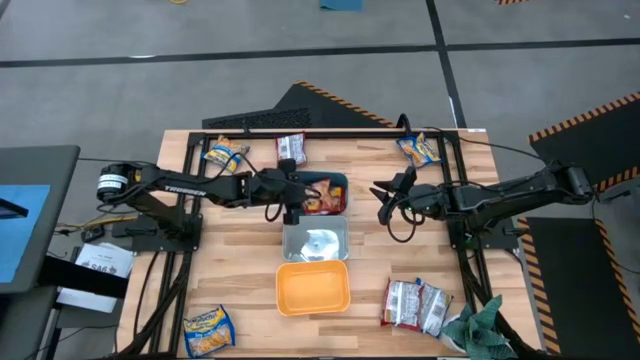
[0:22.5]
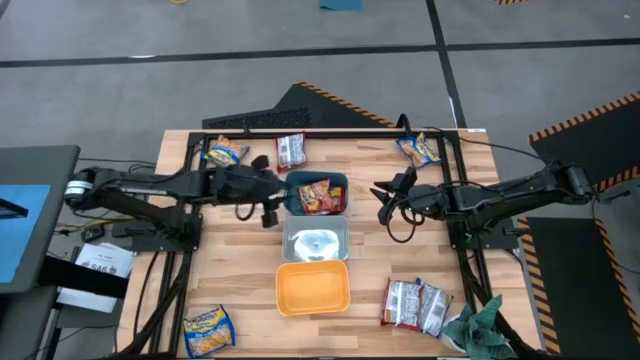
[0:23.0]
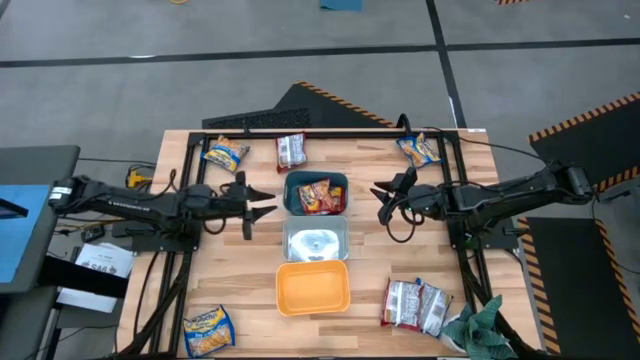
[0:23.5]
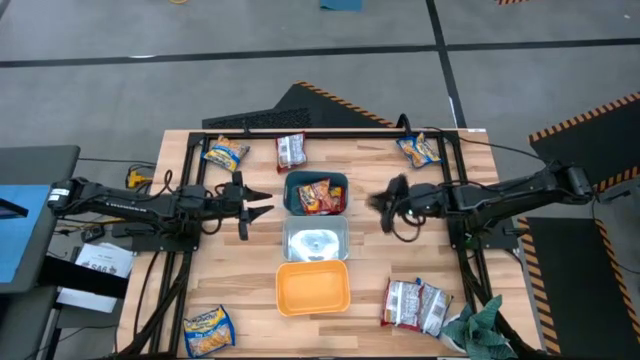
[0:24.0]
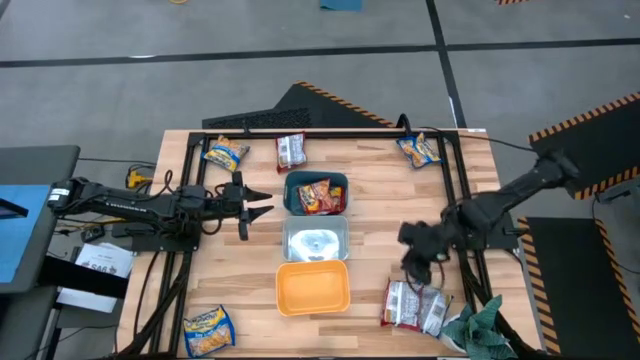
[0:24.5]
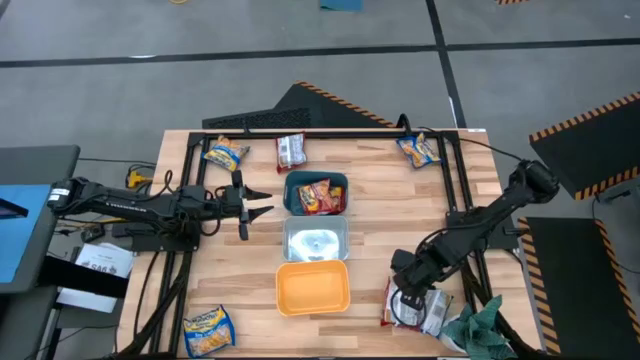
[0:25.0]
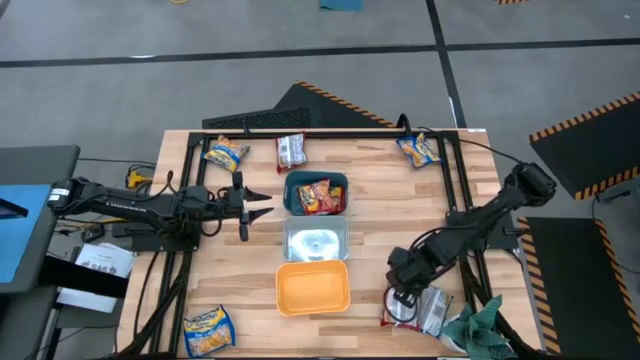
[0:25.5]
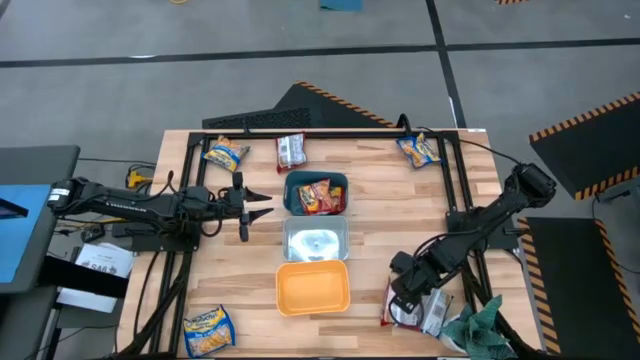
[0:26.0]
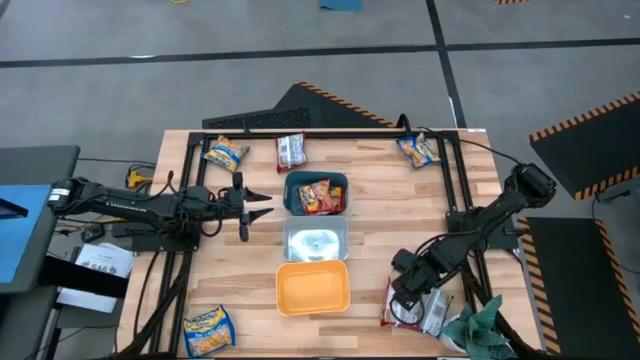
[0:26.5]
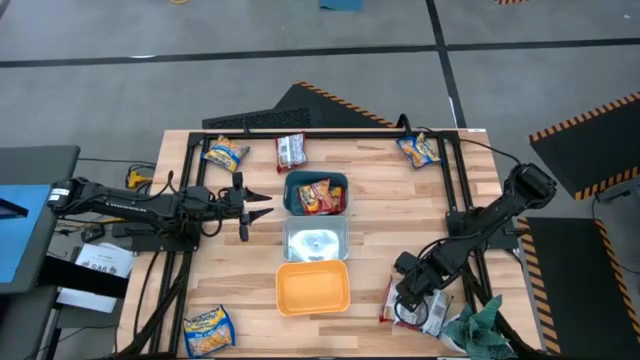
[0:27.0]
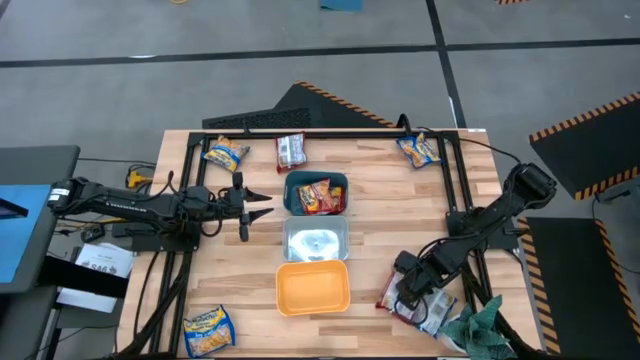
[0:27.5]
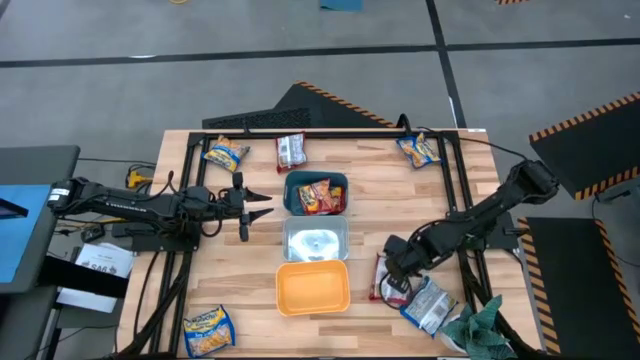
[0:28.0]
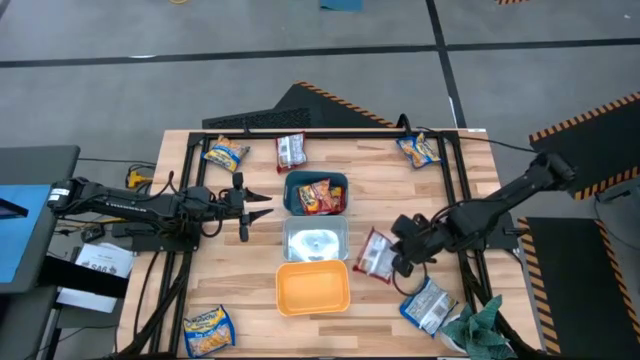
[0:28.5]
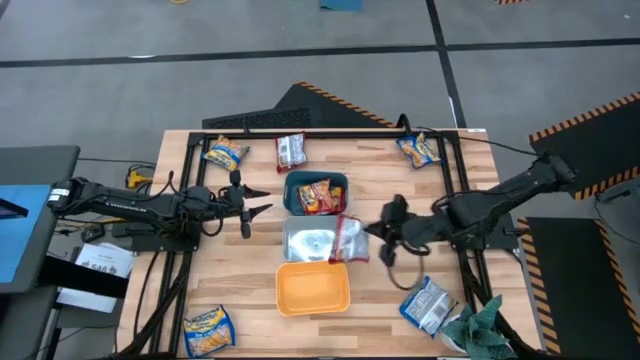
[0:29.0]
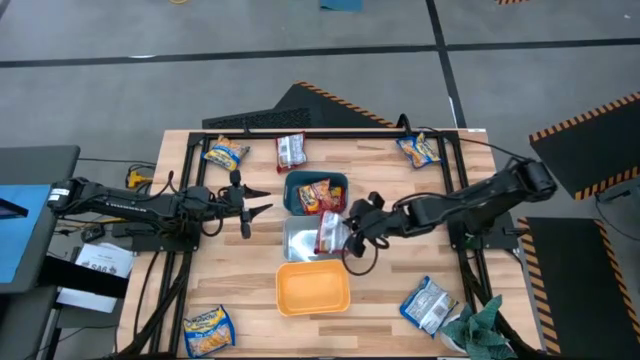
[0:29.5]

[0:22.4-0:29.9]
Task: Sort Maruchan noodles
Put the red noodle pack into the white bin

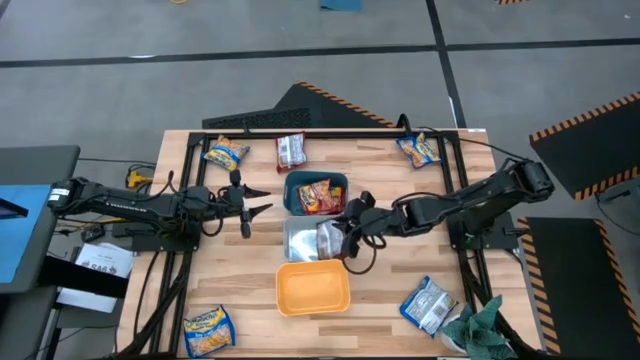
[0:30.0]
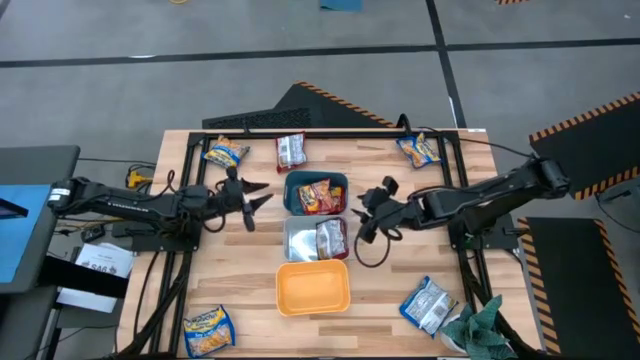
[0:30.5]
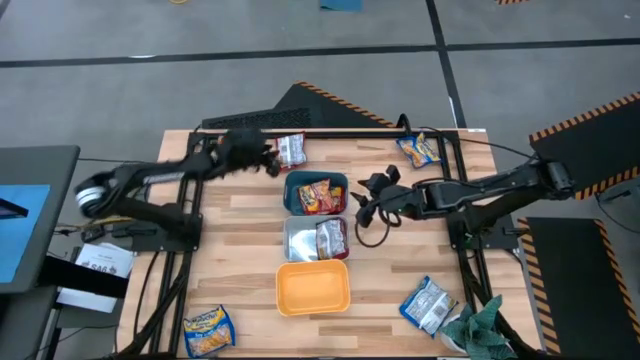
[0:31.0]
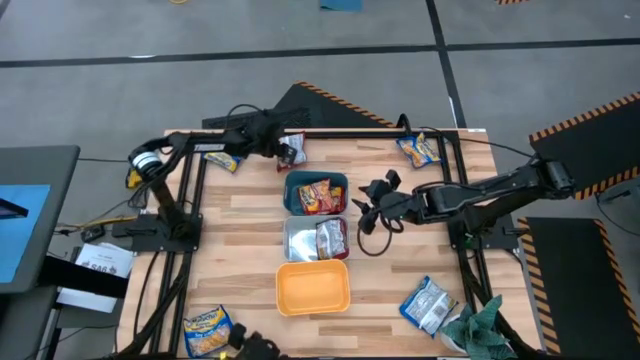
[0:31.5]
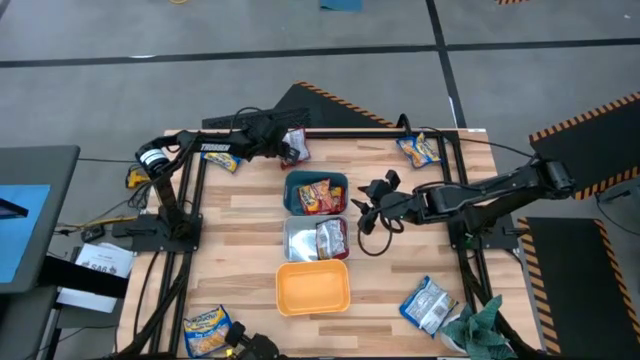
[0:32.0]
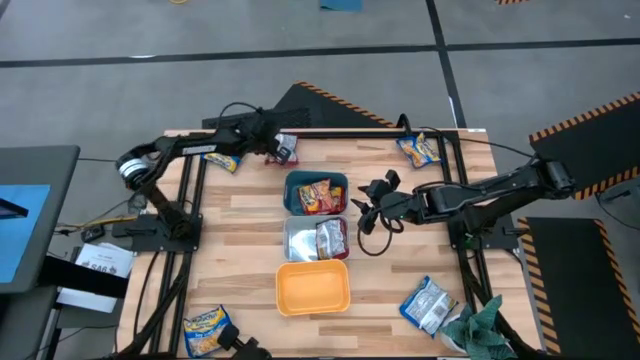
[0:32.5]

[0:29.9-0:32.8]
Put the red noodle pack into the white bin

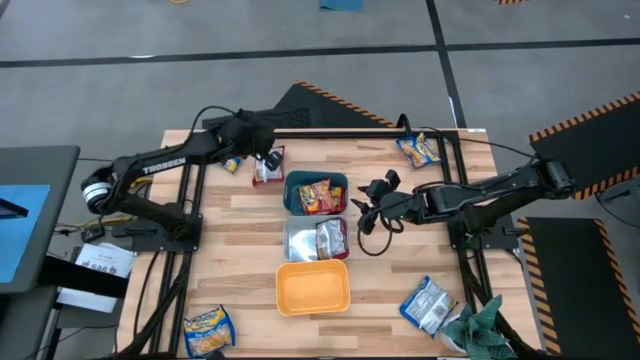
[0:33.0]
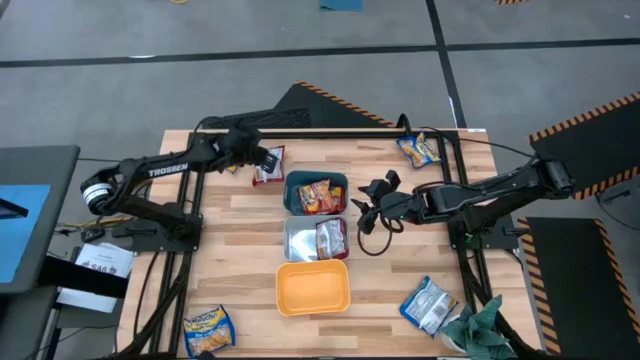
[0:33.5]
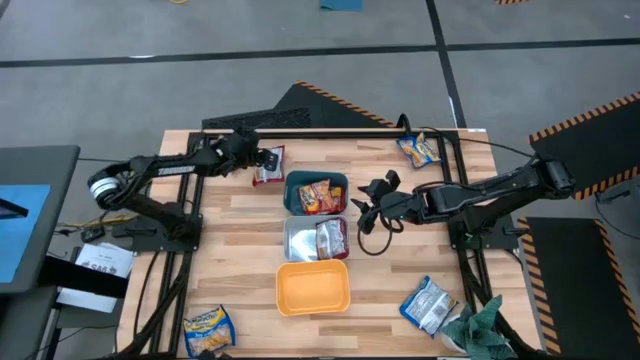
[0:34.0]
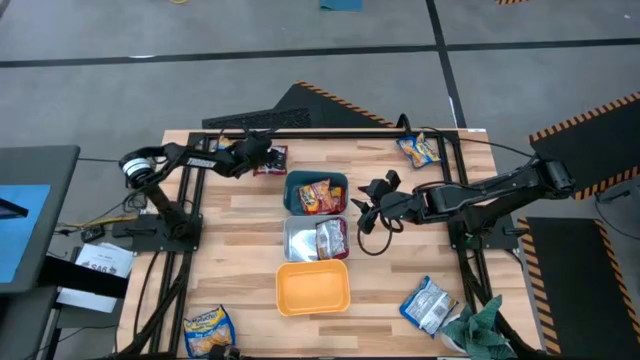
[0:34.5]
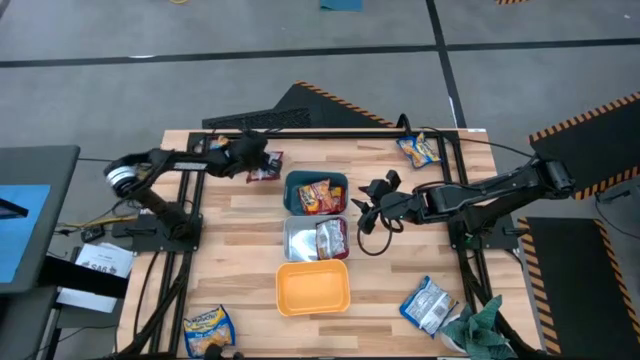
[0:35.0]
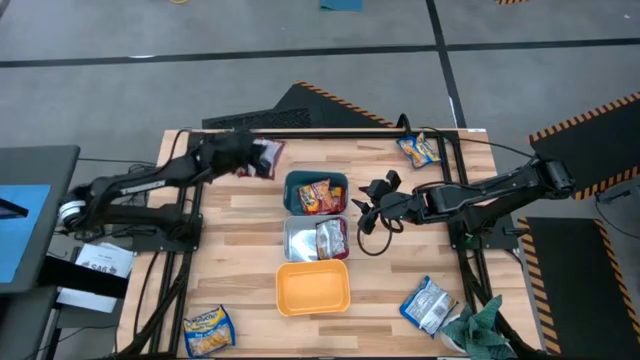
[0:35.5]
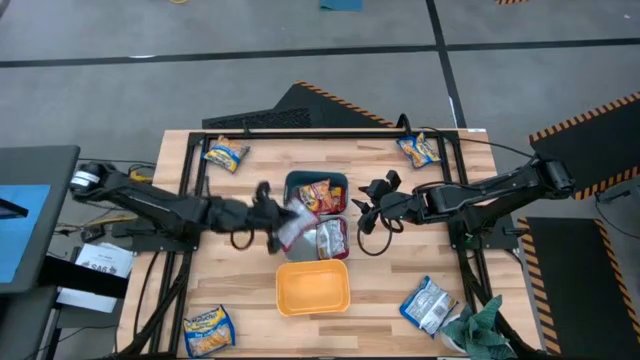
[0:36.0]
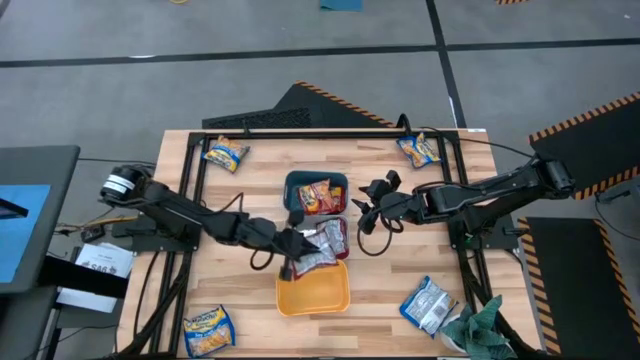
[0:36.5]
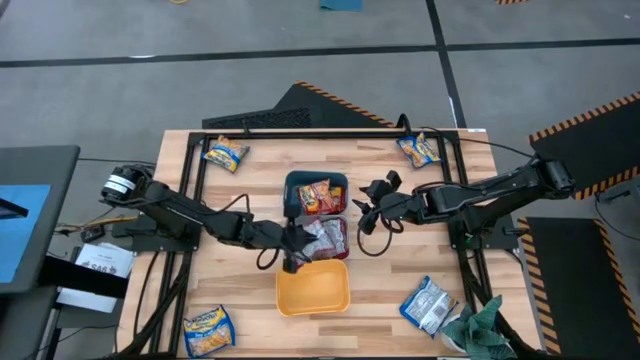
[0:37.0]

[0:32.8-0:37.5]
Put the red noodle pack into the white bin

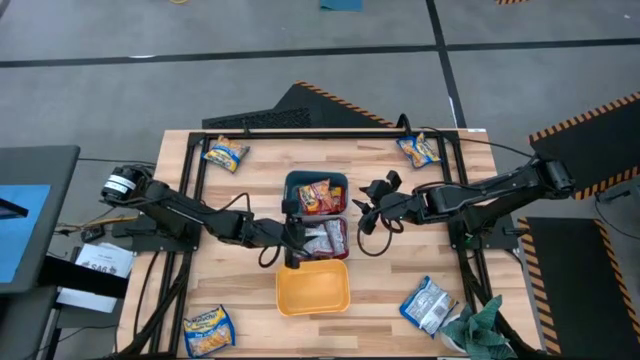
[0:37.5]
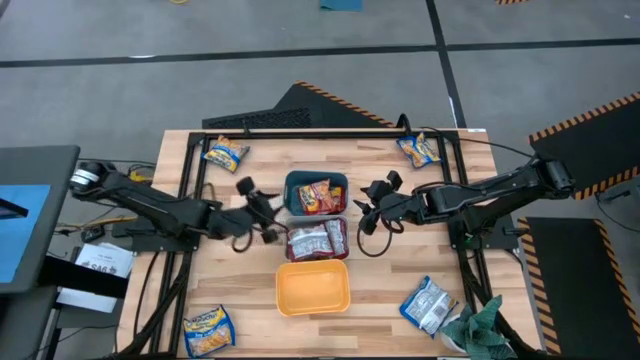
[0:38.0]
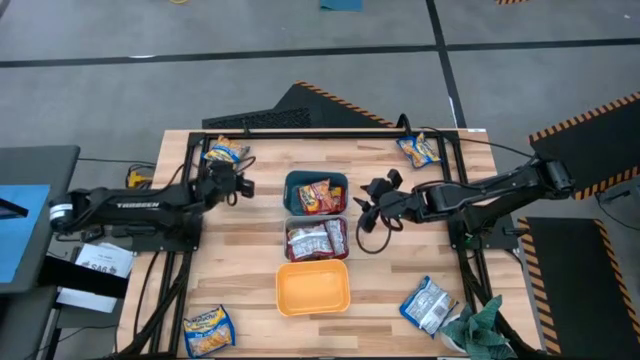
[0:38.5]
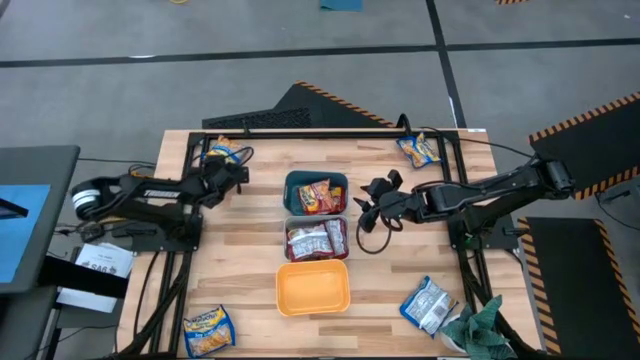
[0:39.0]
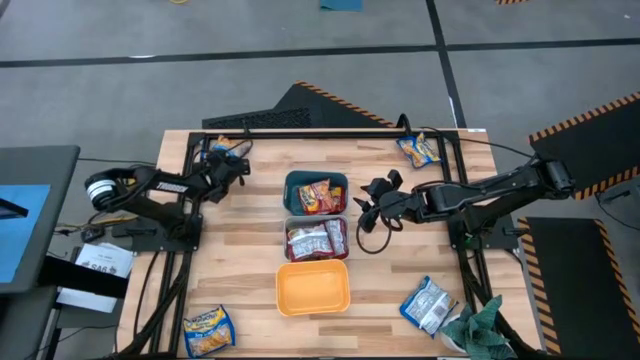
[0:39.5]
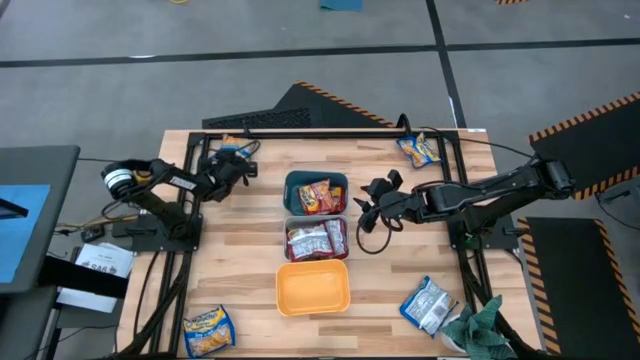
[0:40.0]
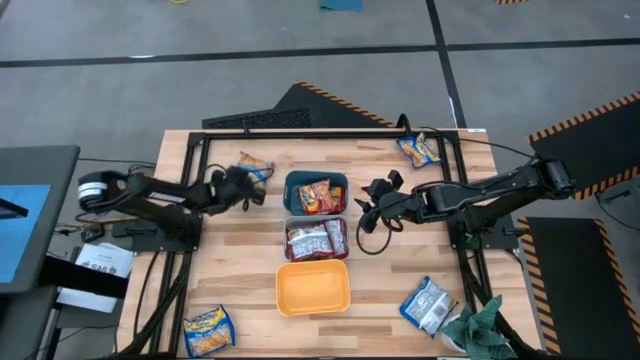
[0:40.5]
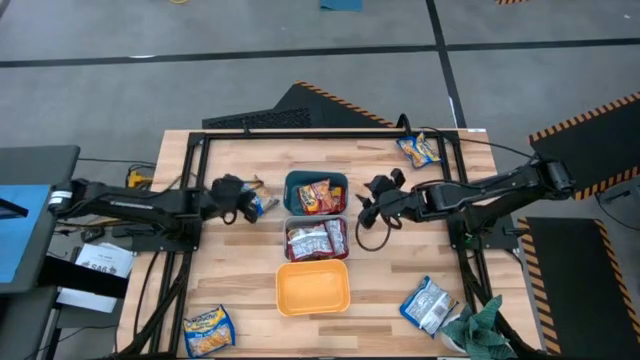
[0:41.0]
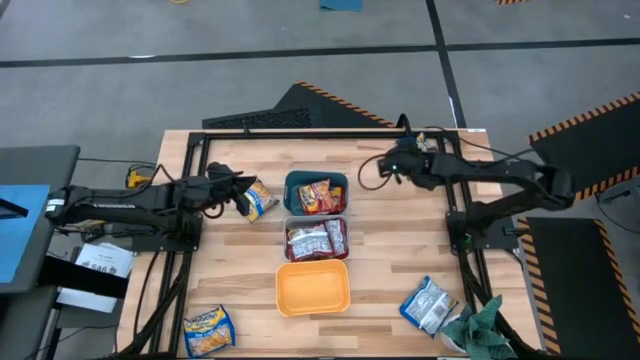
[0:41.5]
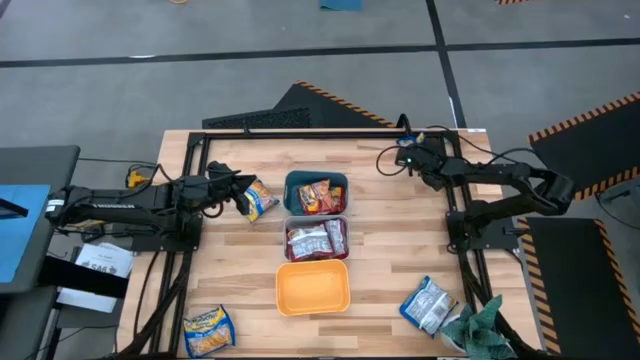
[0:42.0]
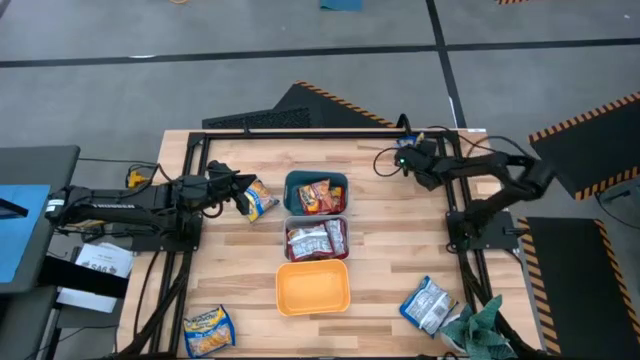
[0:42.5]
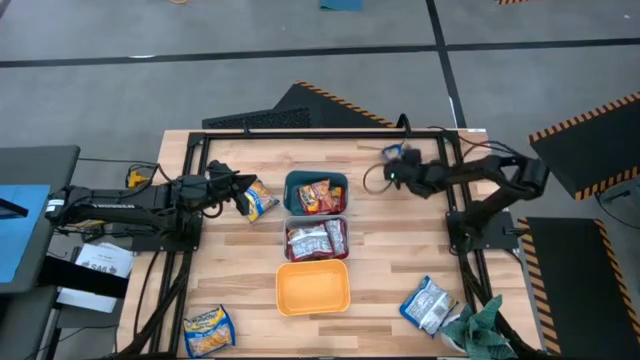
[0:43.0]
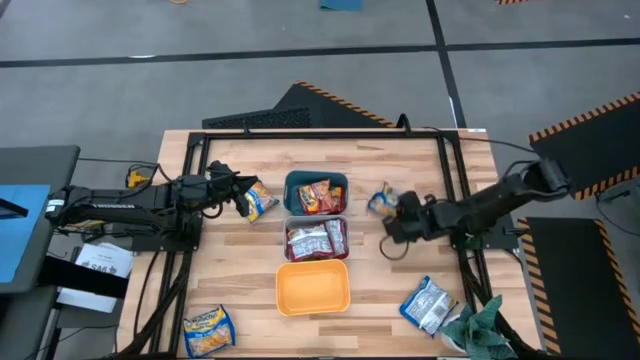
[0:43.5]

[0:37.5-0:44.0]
Adjust the blue noodle packs

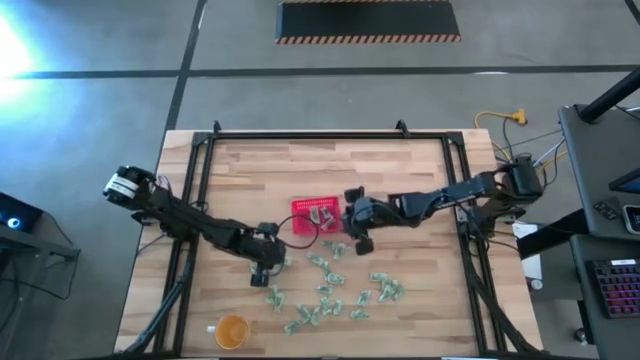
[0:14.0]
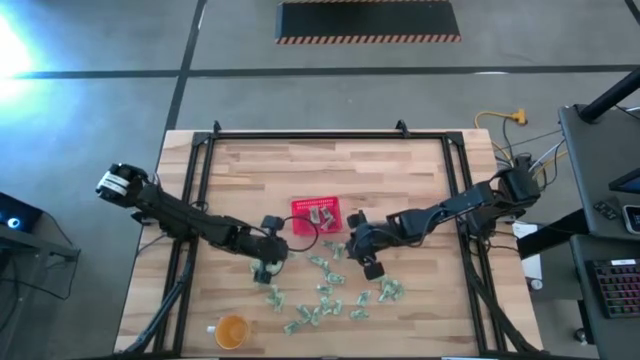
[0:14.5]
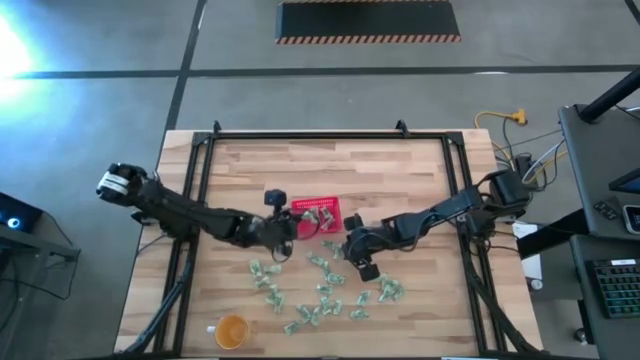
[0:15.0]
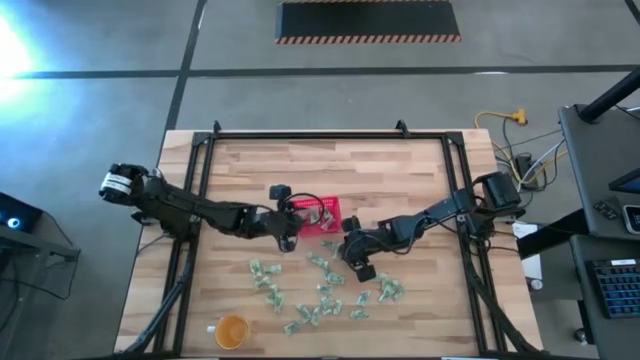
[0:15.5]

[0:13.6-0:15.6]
Task: Pick and place items into bin
Put the stevia packet into the red bin
